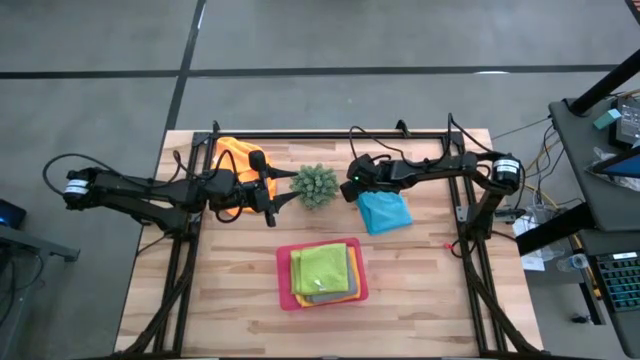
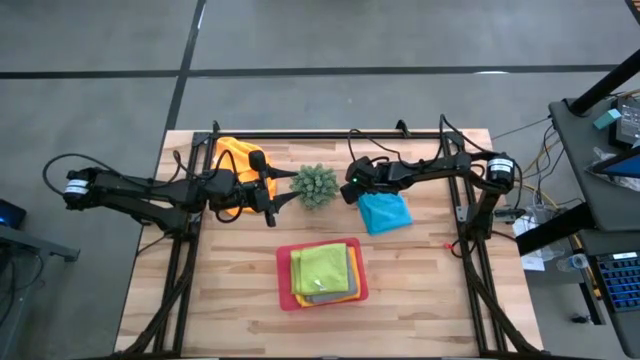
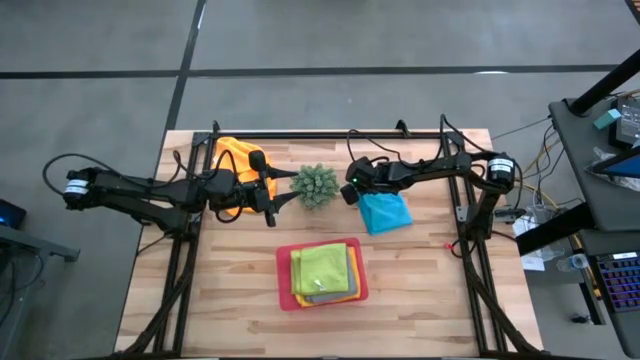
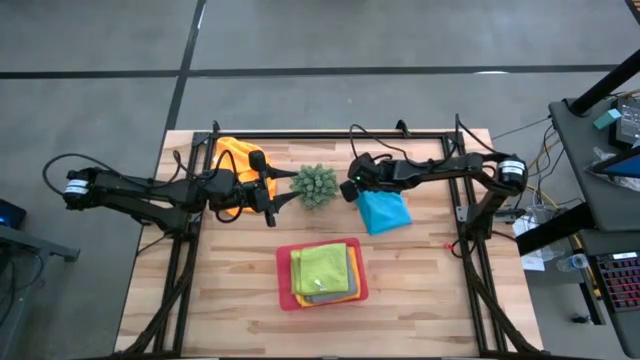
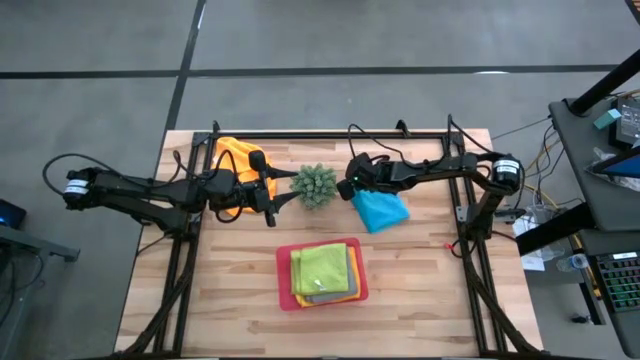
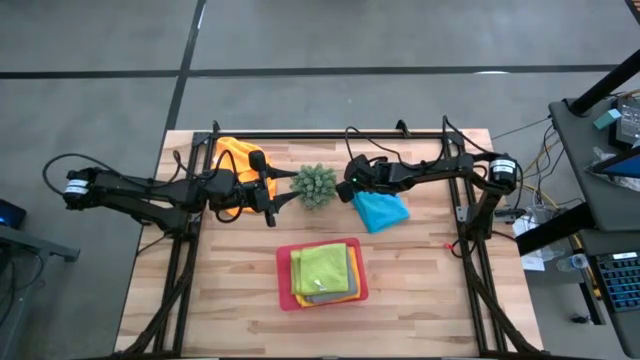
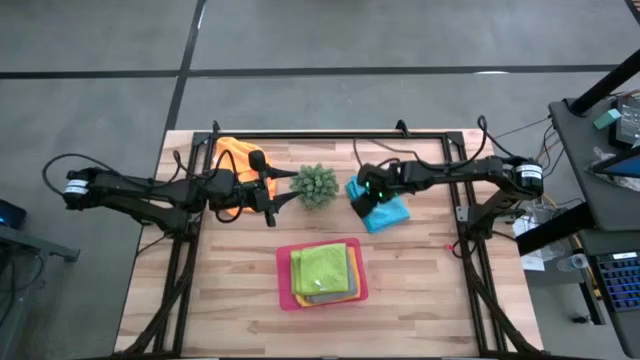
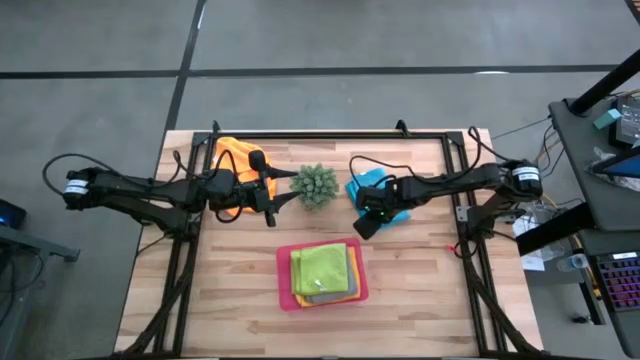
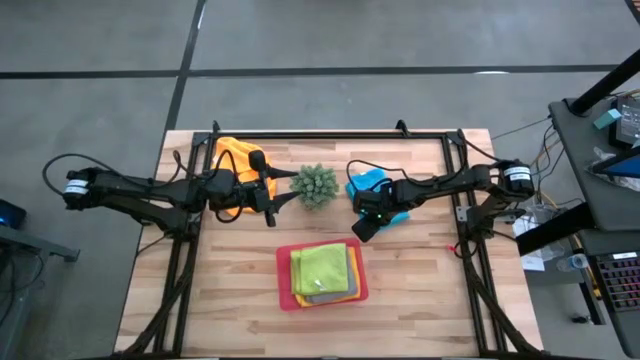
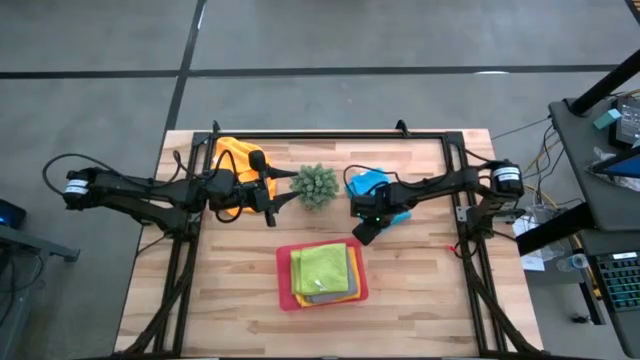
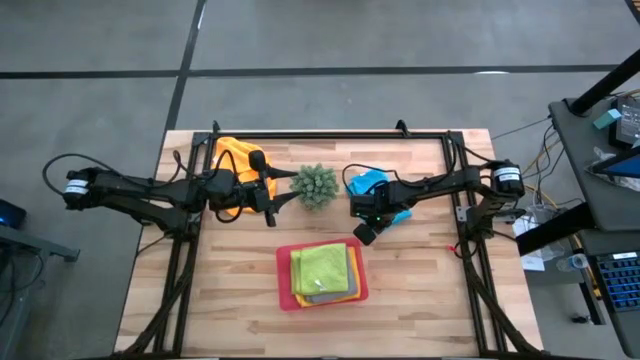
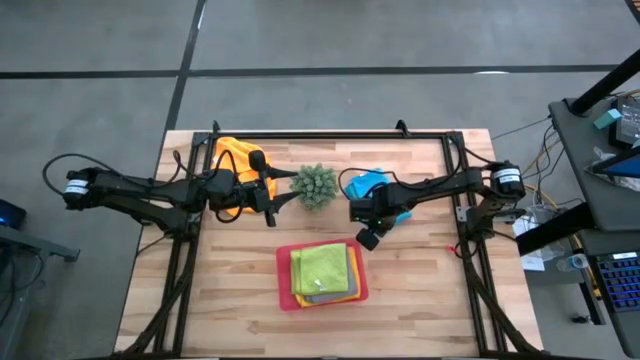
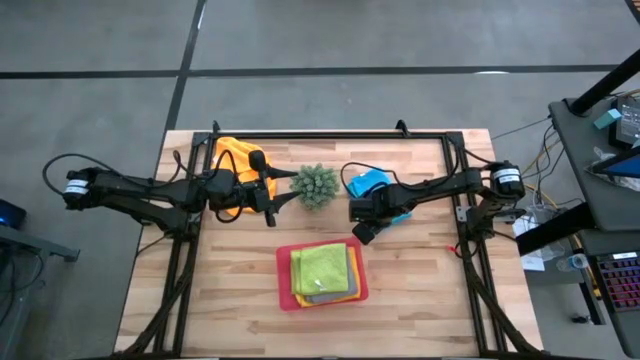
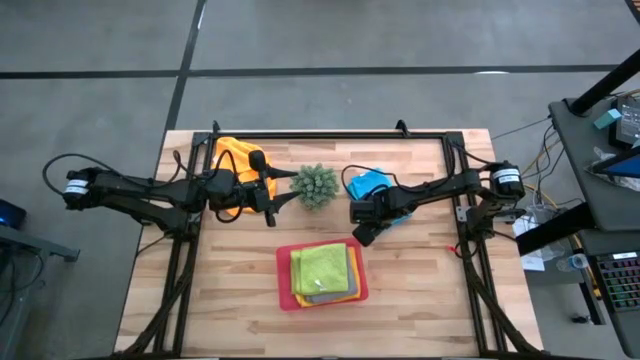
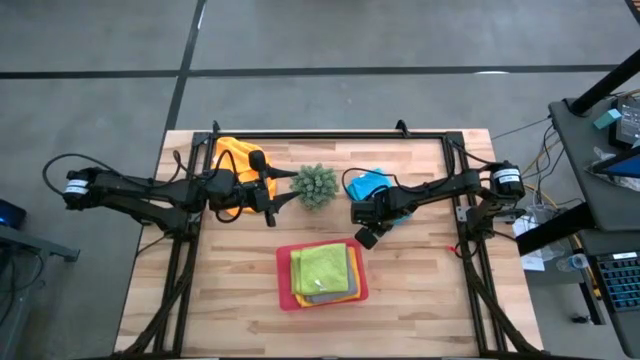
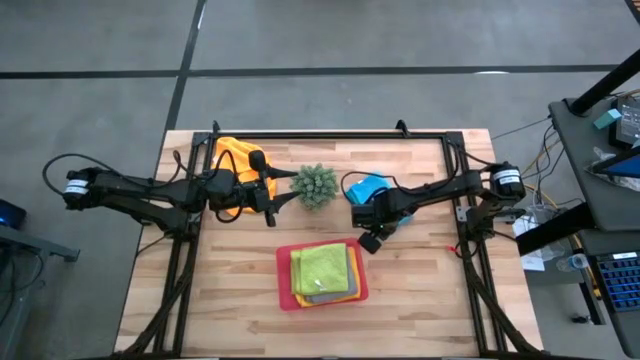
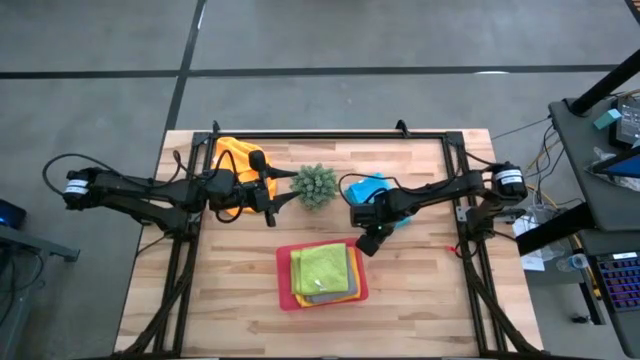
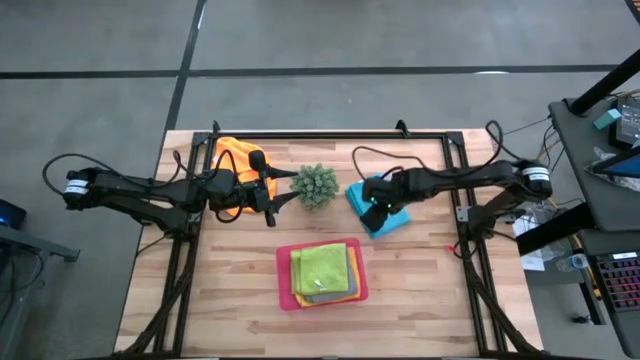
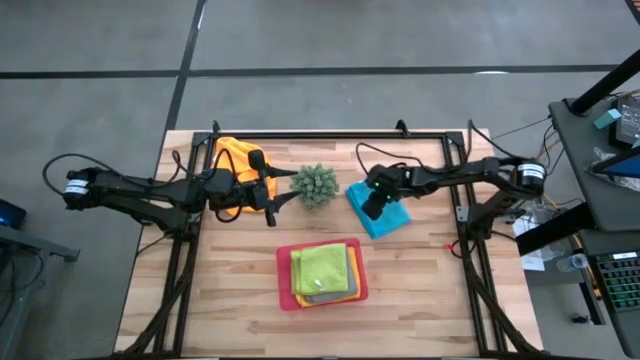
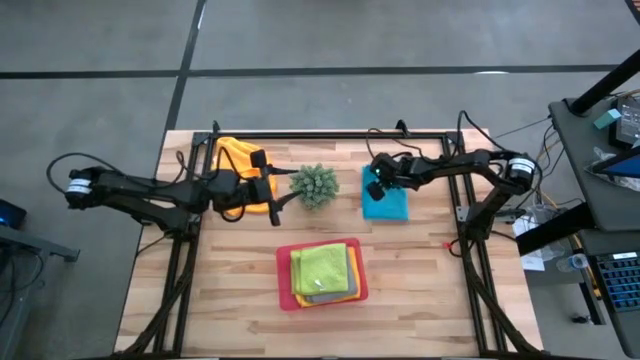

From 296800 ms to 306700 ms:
Task: Fold microfiber towels
Fold the blue microfiber cloth

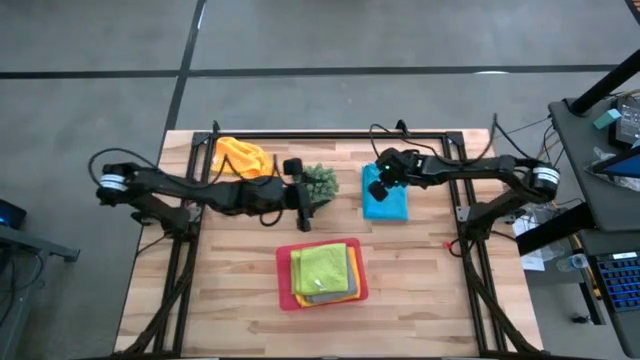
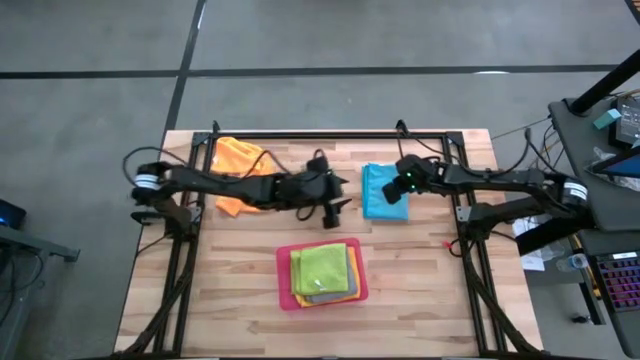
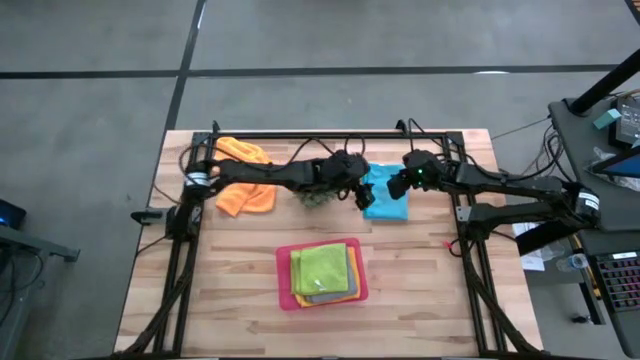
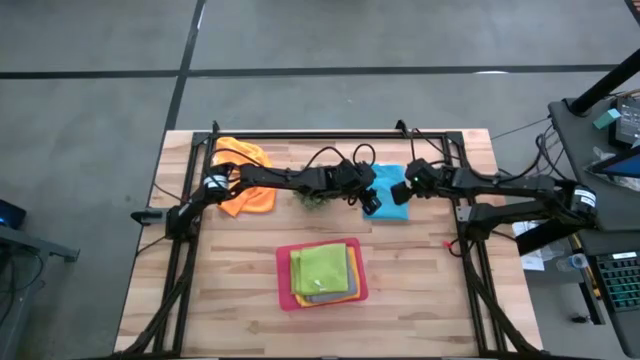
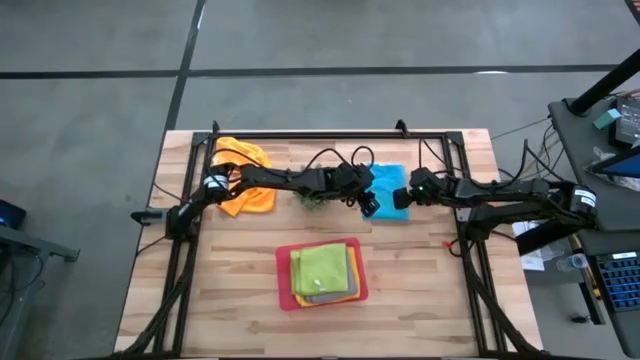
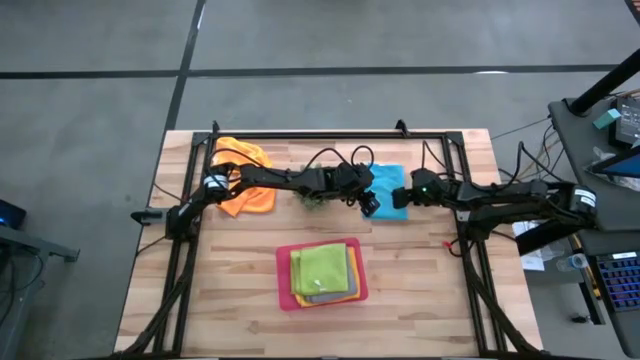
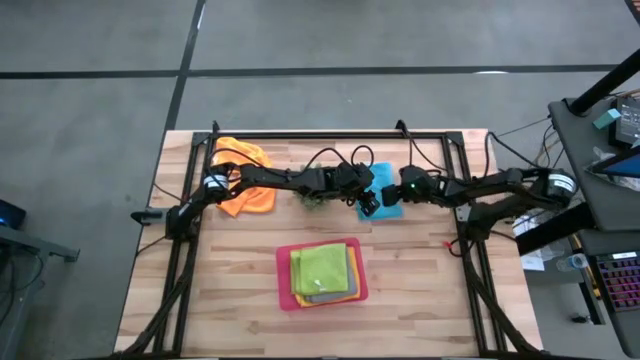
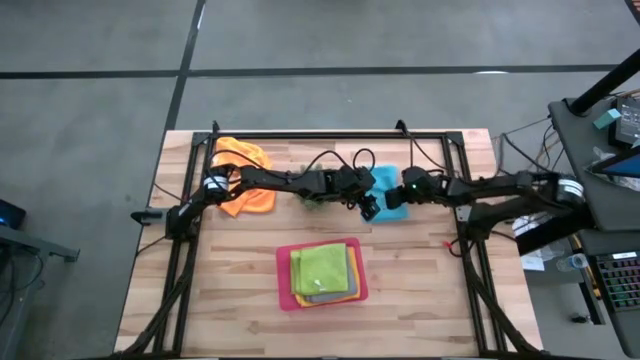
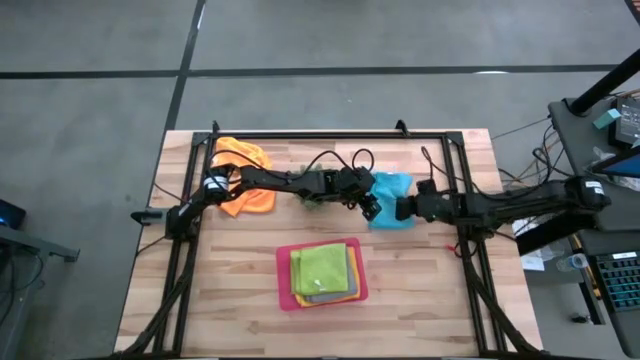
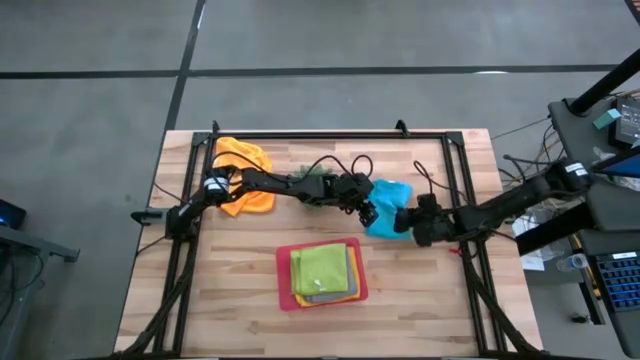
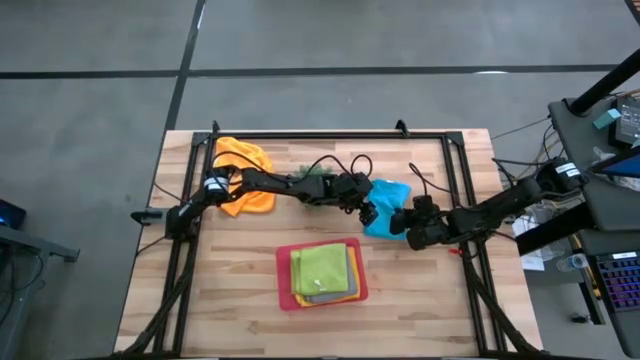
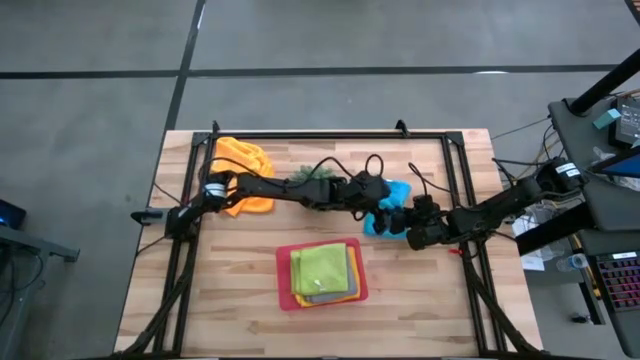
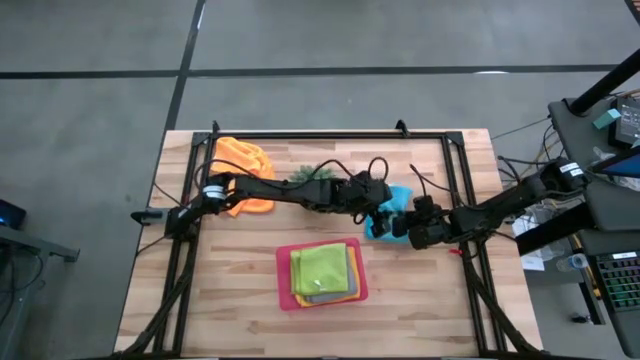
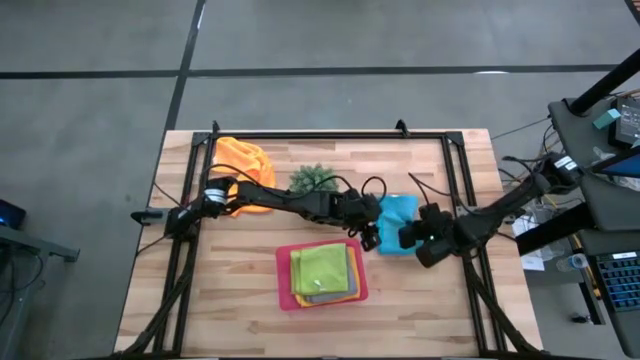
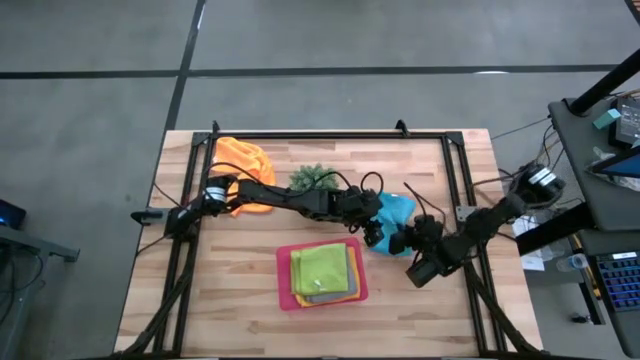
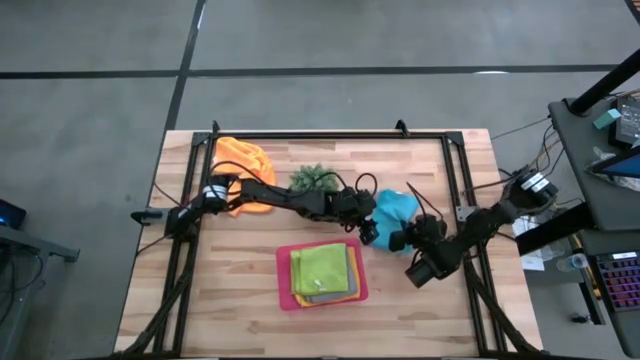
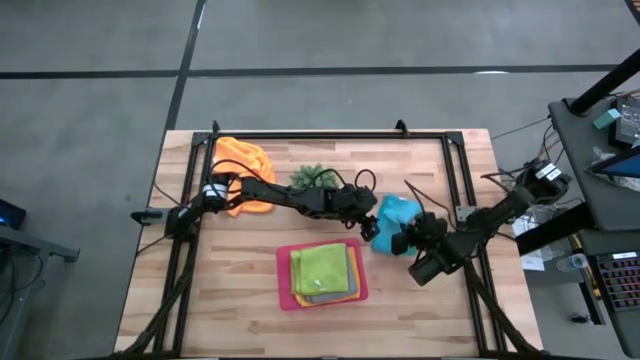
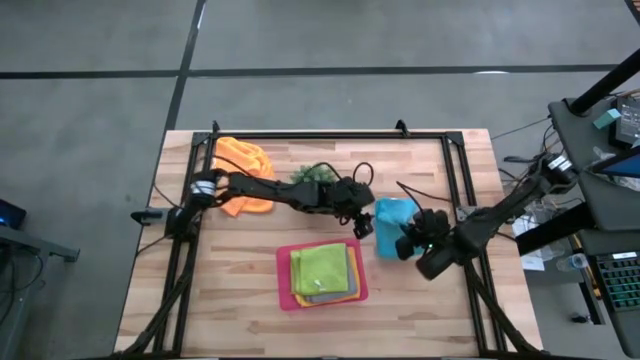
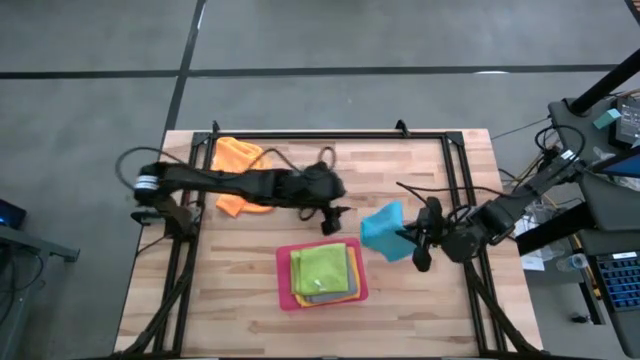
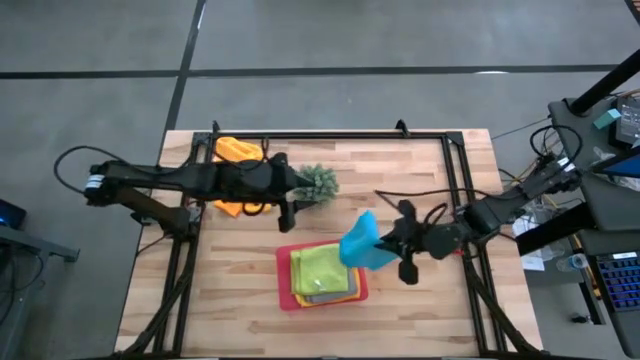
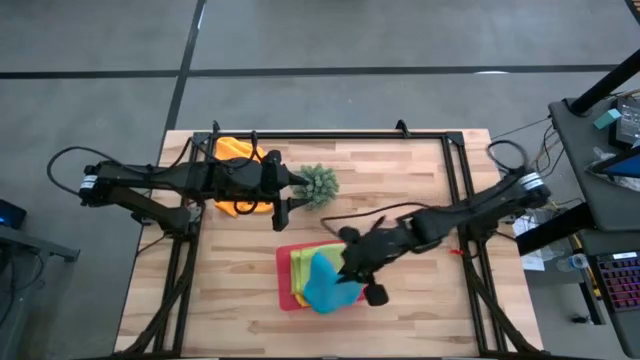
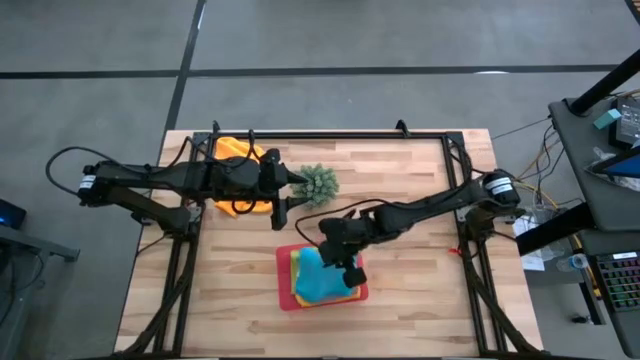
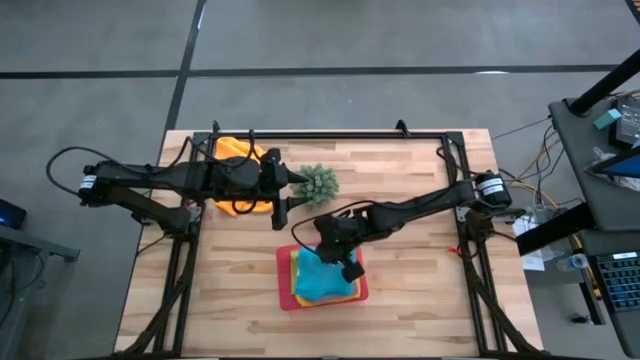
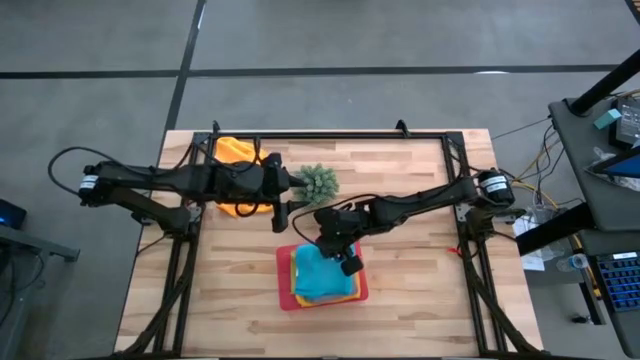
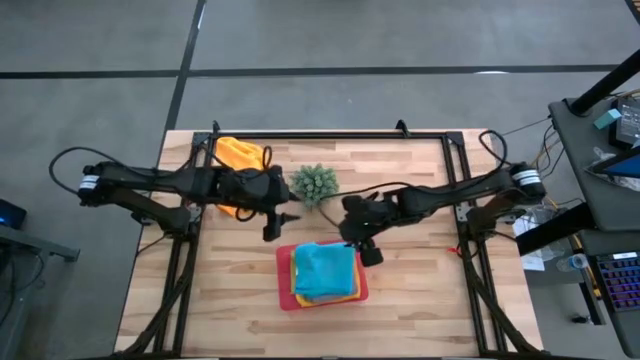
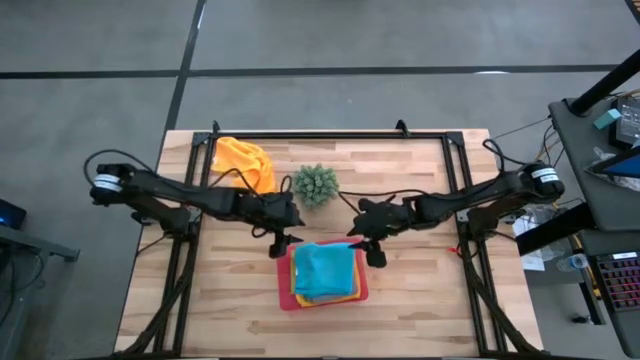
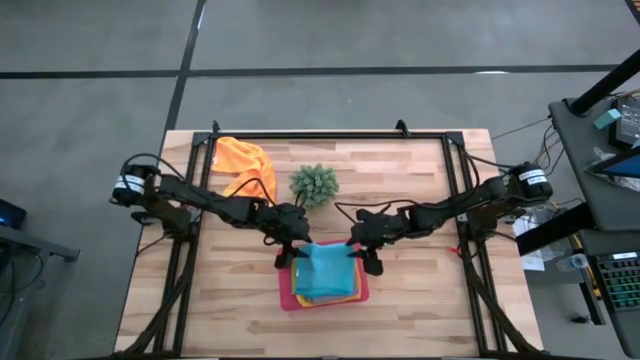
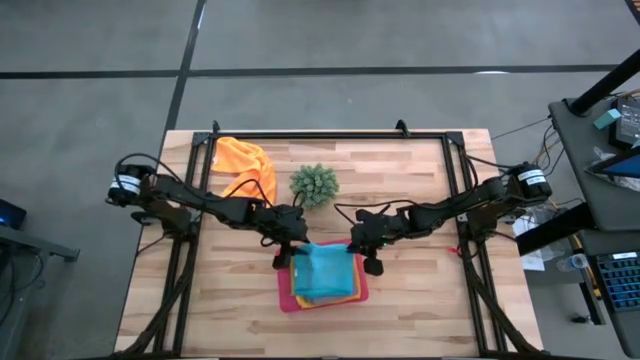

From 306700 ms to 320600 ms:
Put the blue microfiber cloth into the pink bin
